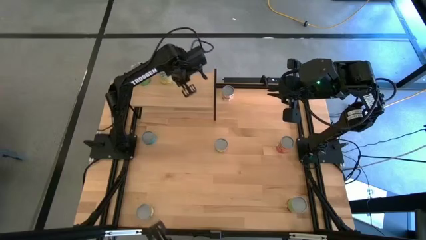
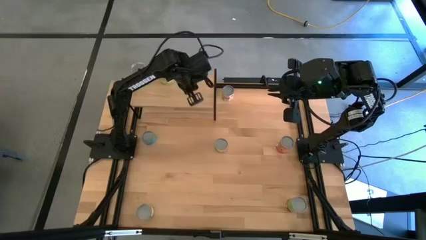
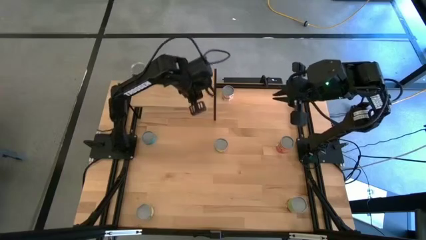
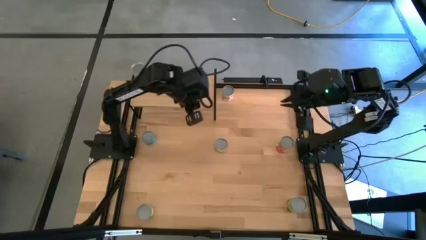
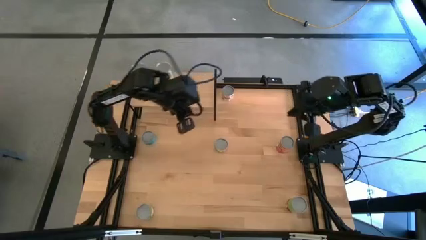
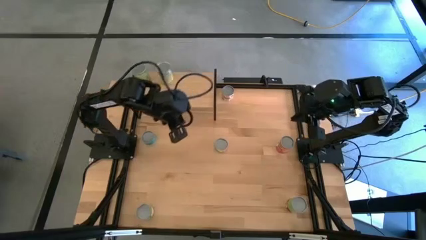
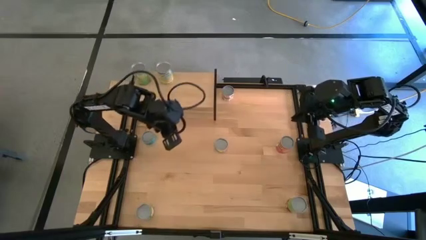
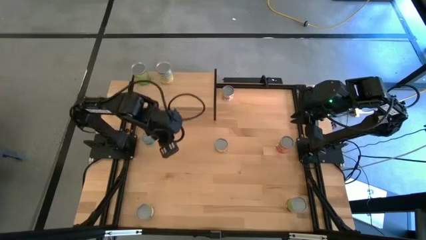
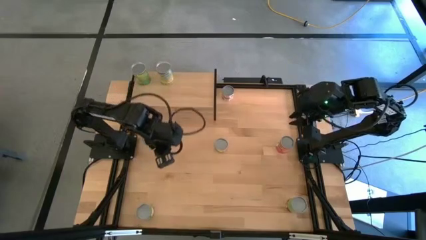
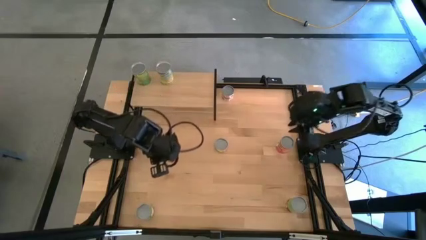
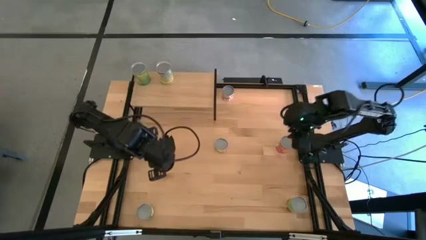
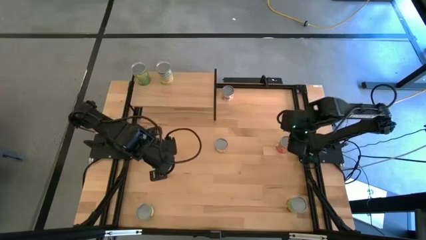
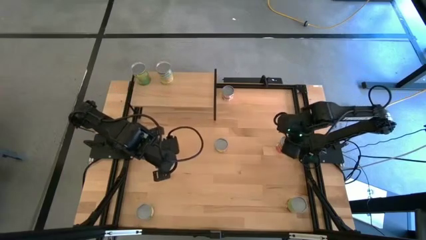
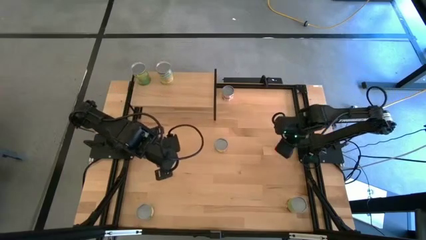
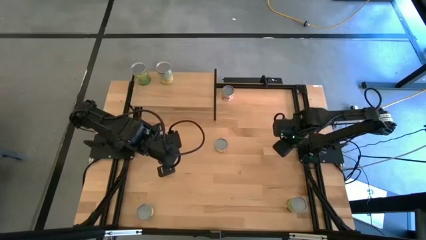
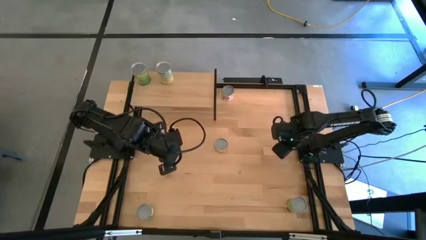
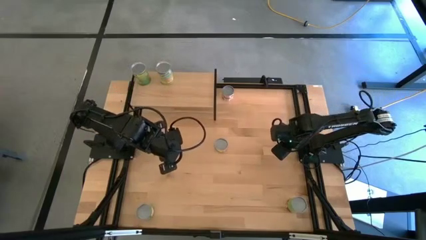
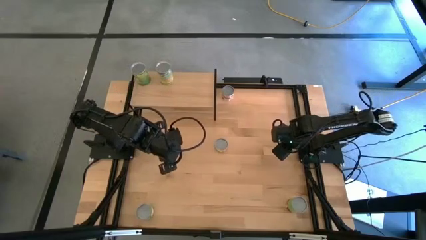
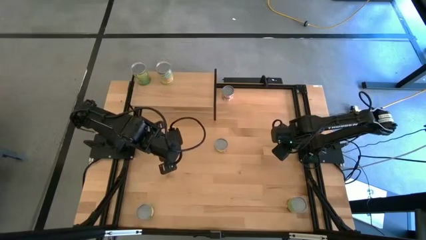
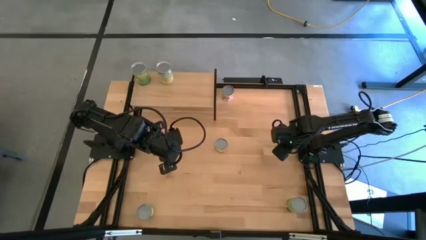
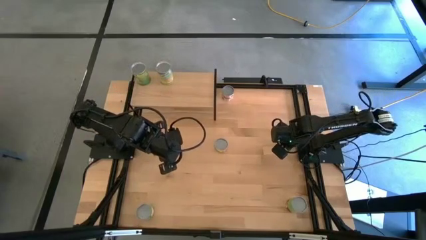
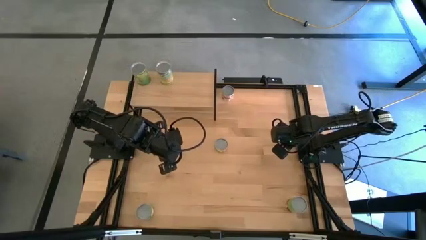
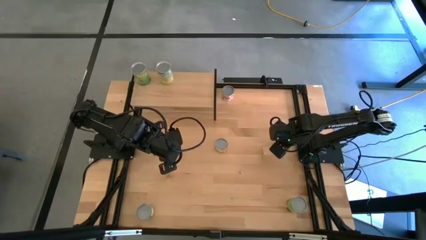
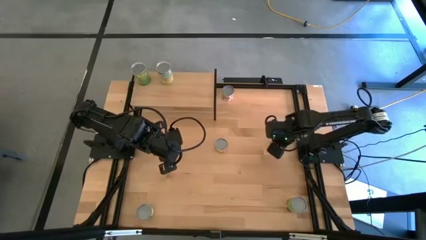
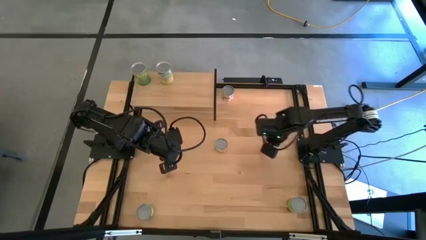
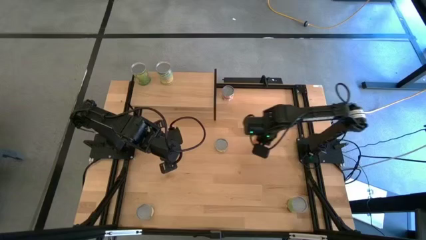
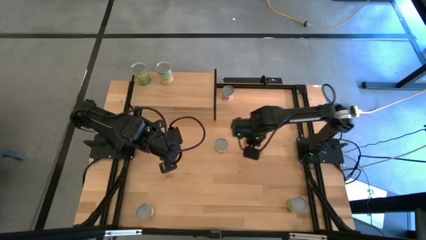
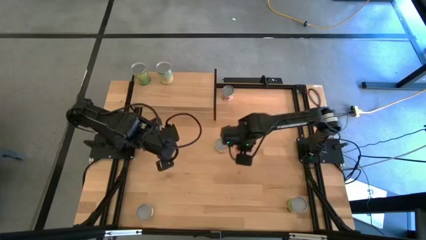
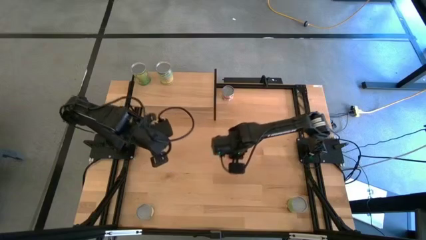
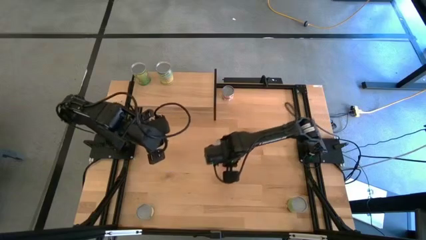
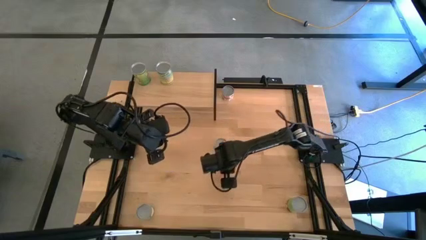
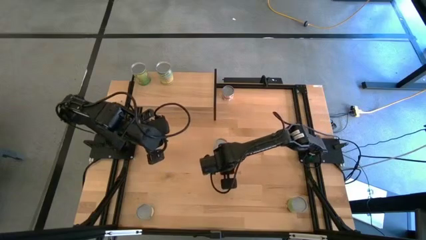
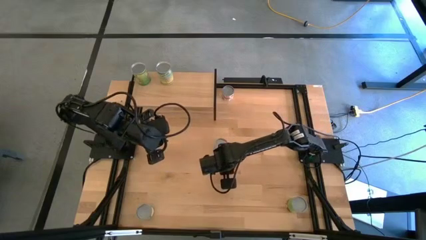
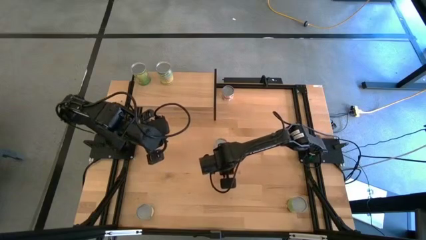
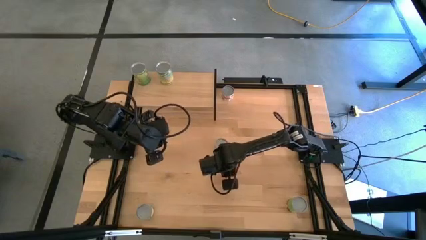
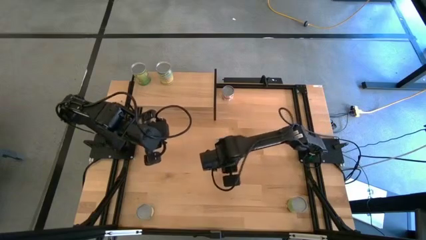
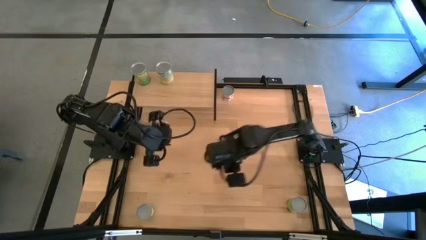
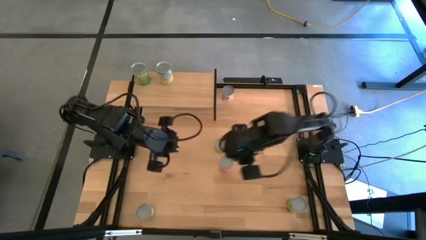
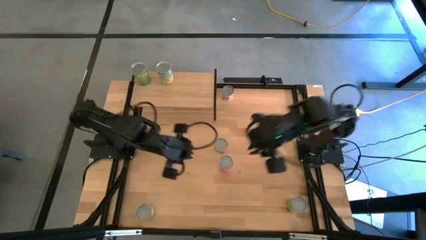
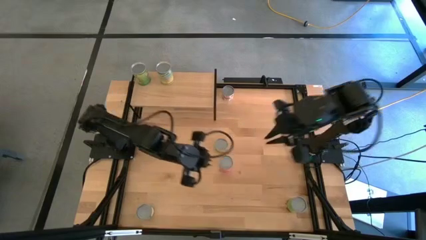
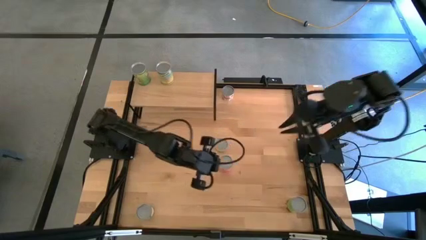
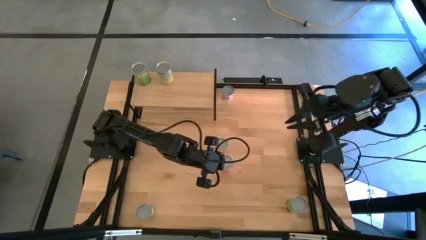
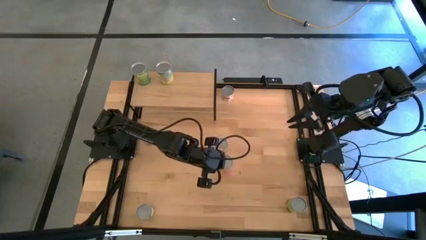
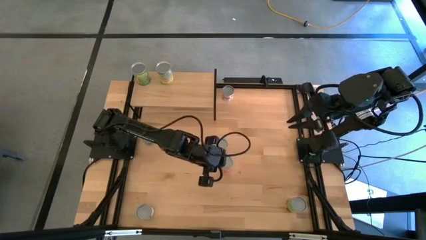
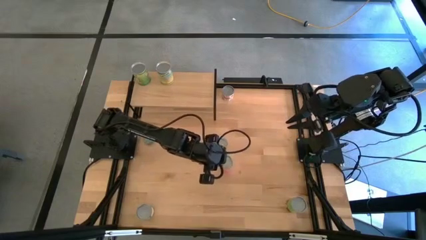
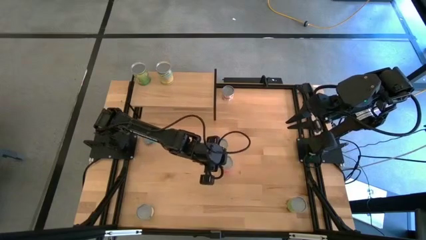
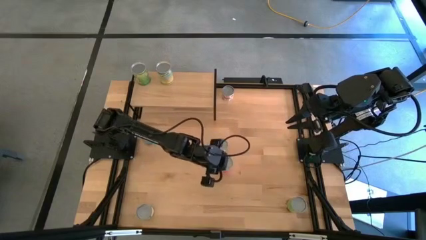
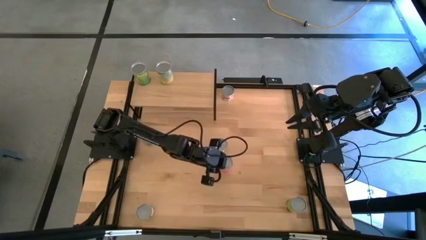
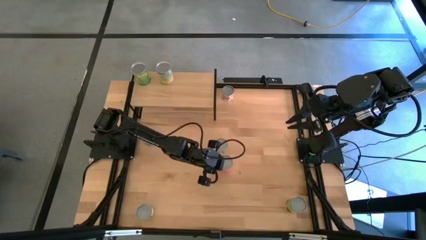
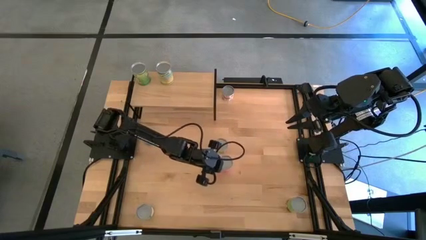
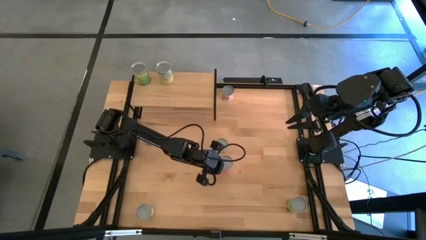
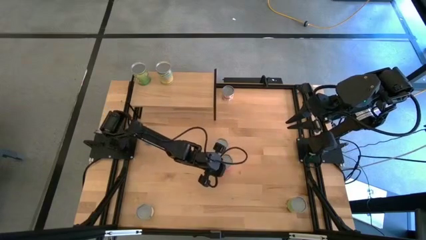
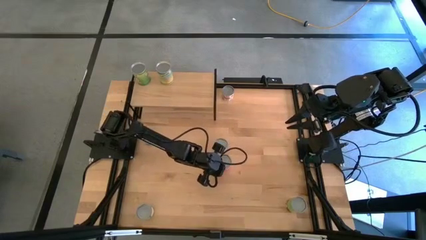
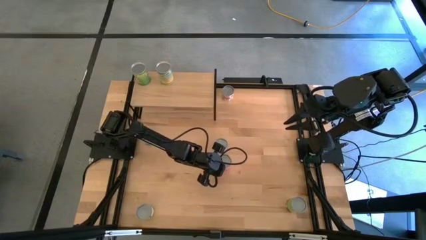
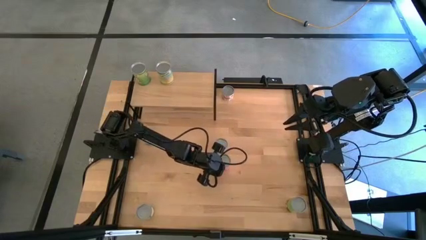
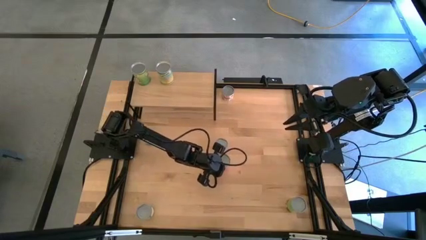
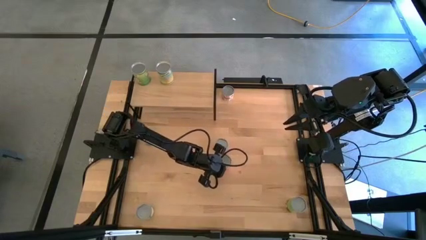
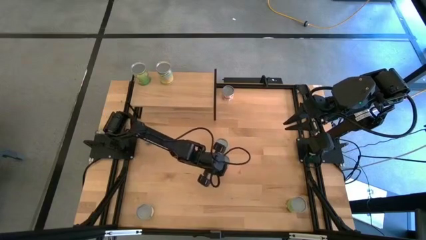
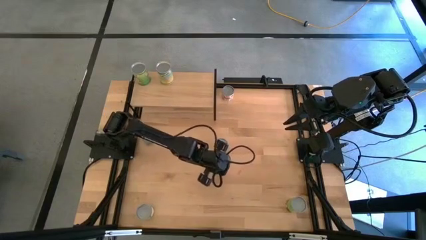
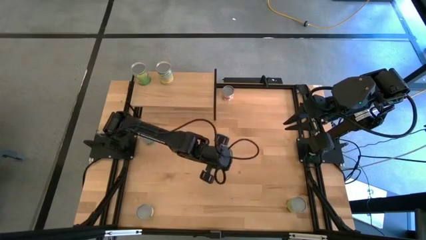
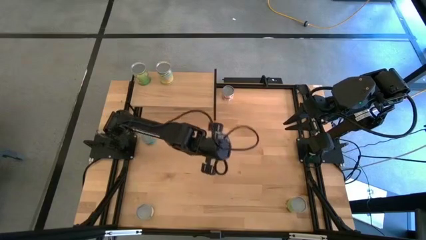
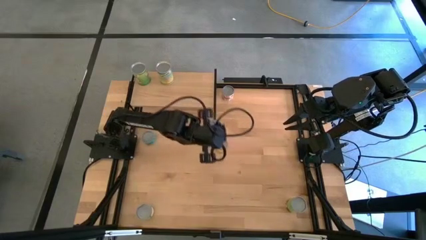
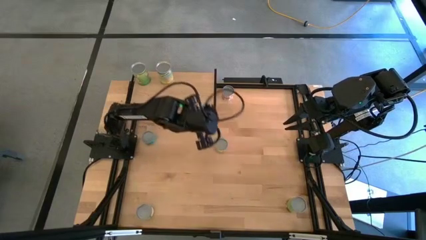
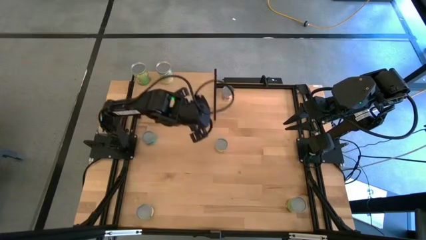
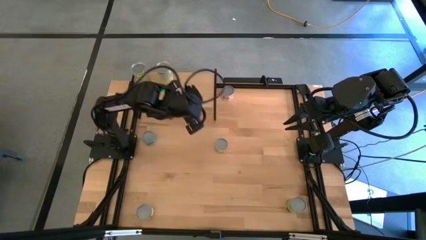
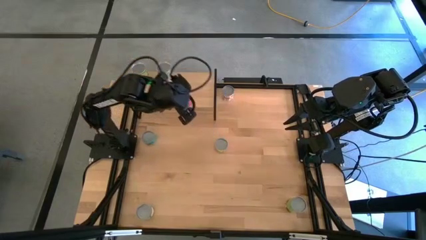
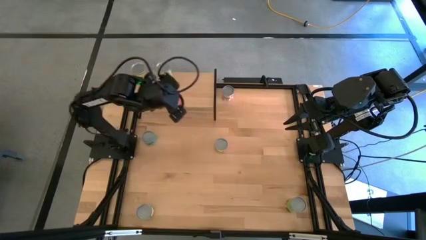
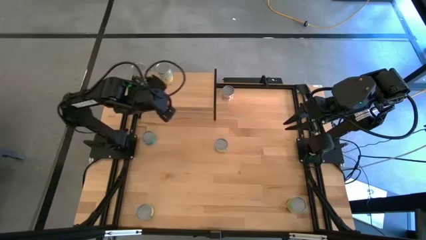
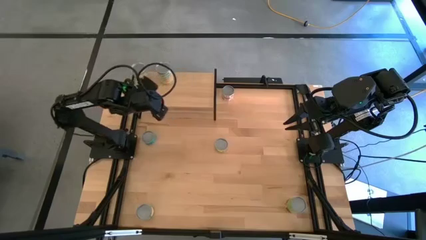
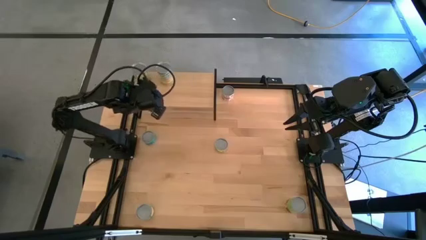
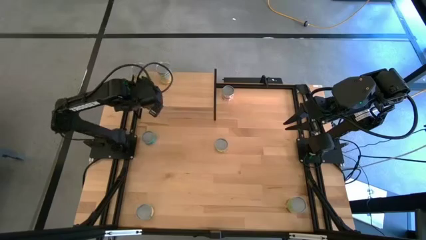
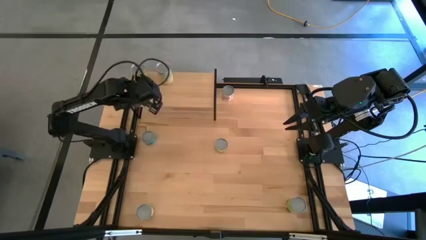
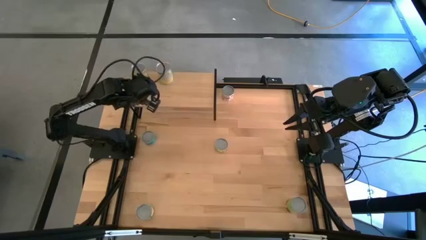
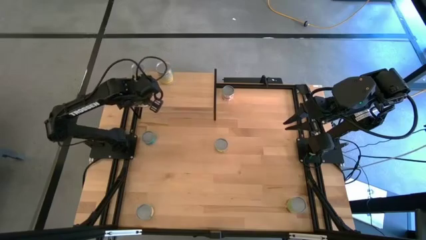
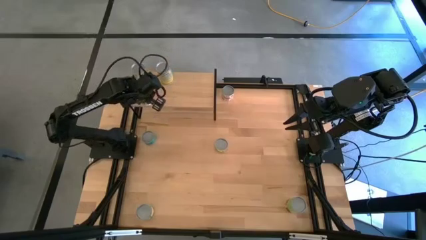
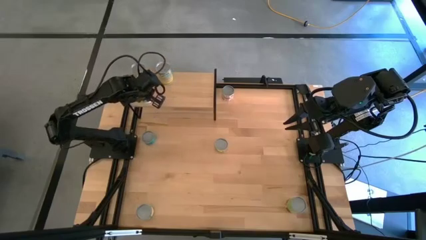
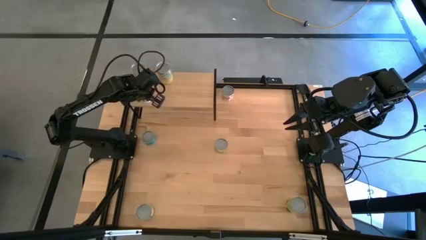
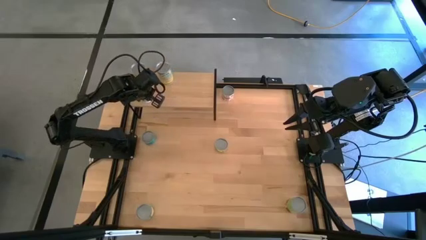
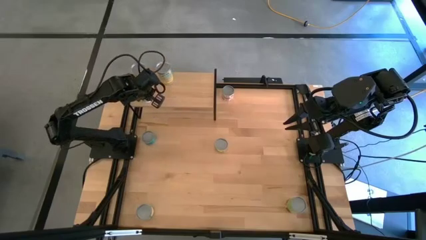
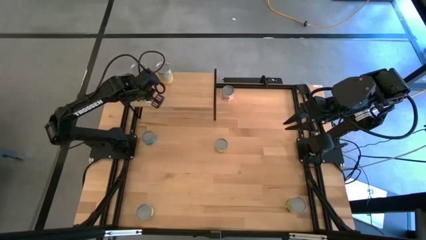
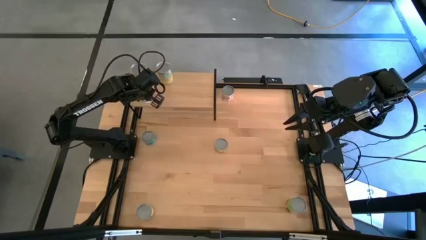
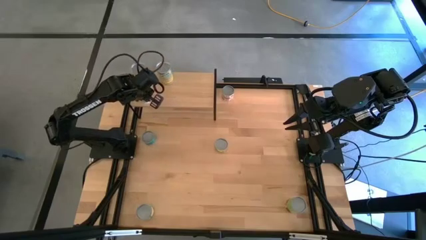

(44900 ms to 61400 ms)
Task: Pick and place cans onto a shelf
Put the canned mixed fruits on the shelf

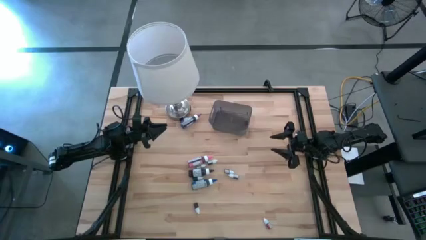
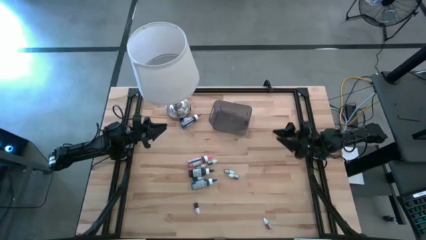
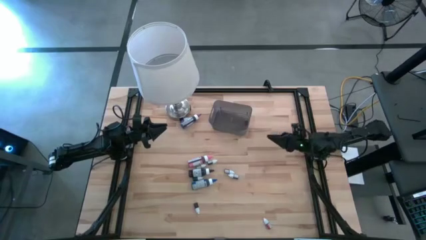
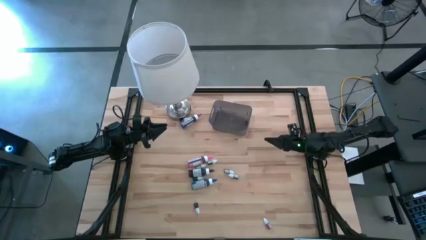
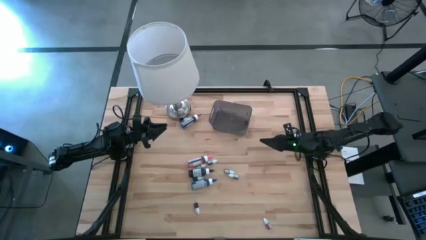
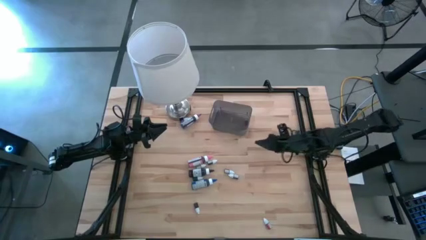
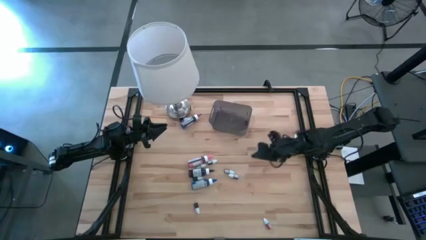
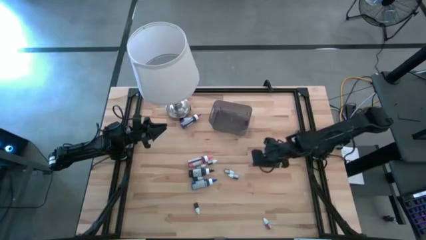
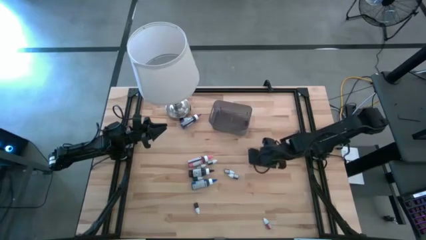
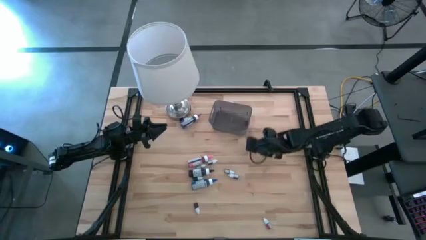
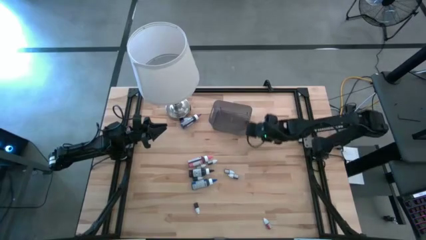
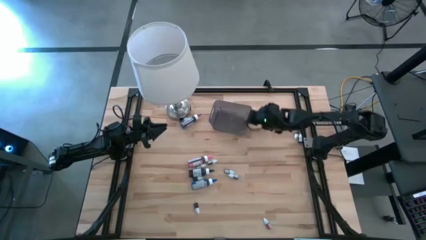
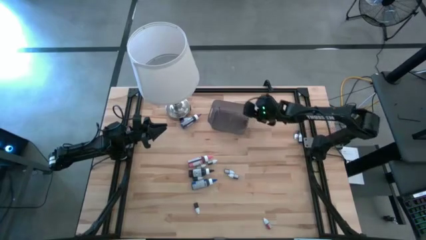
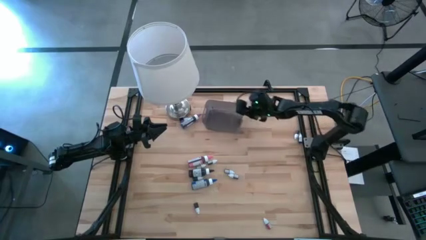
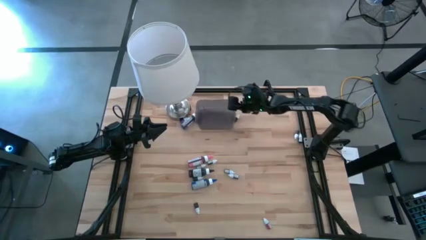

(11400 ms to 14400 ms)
Task: Pick & Place food coloring
Adjust the bin on the table
